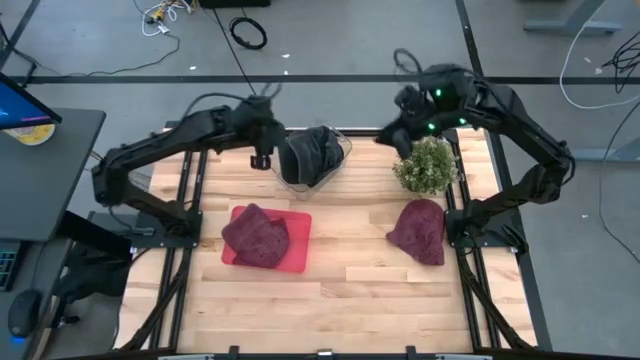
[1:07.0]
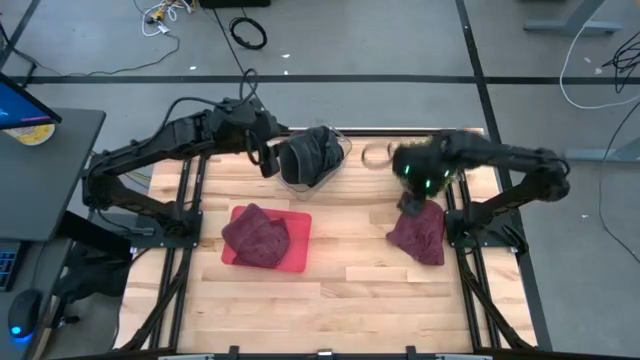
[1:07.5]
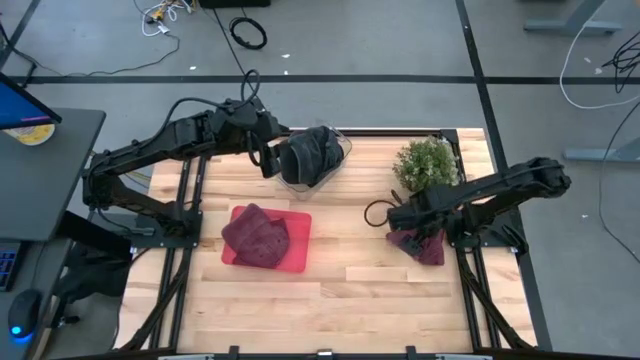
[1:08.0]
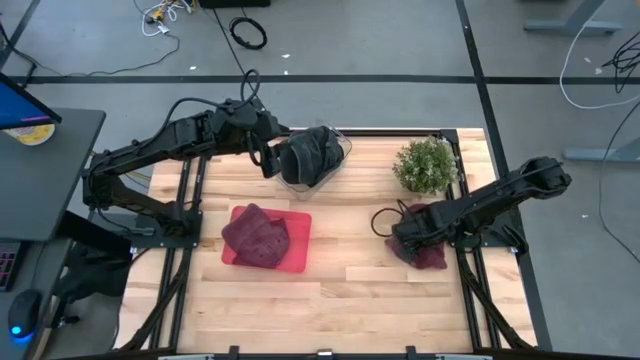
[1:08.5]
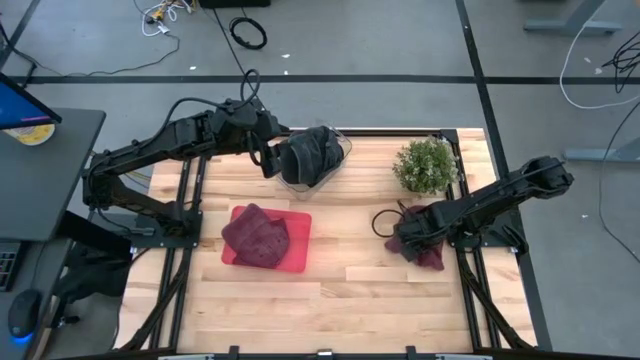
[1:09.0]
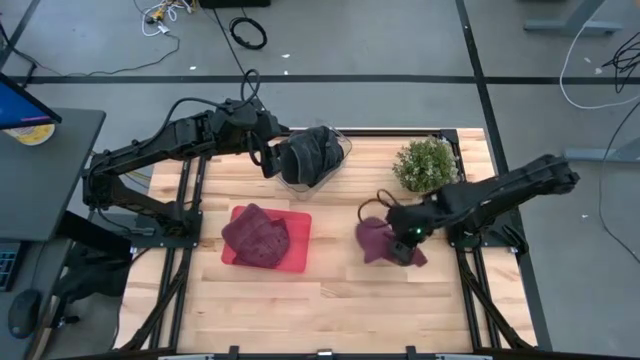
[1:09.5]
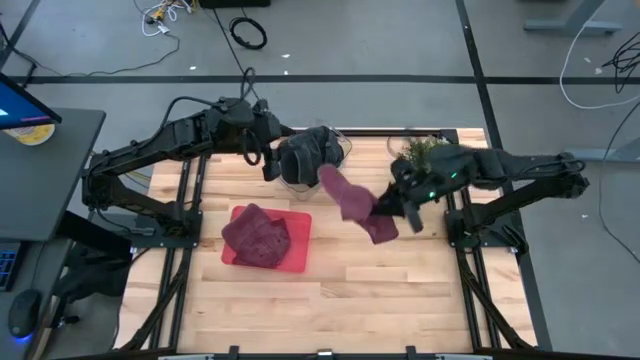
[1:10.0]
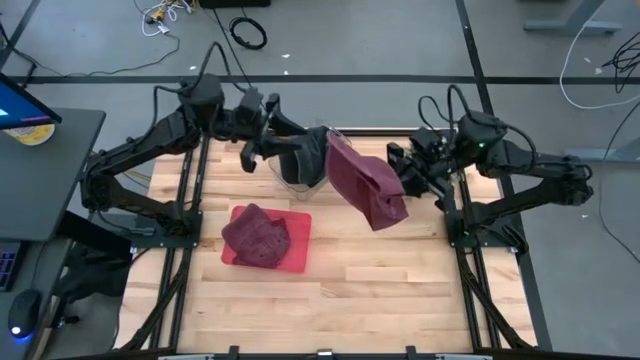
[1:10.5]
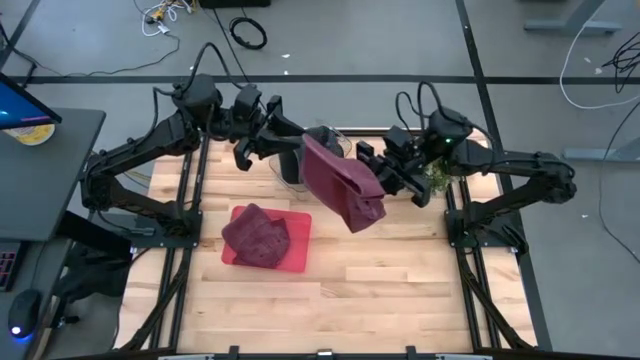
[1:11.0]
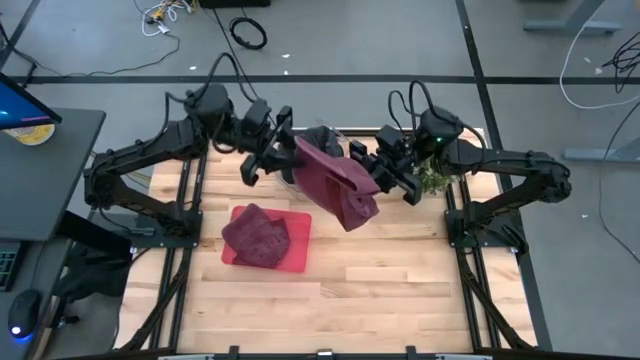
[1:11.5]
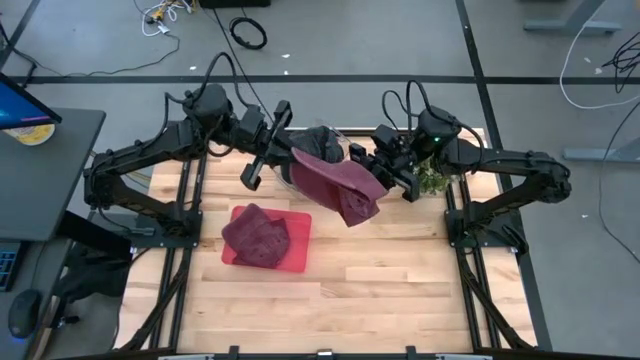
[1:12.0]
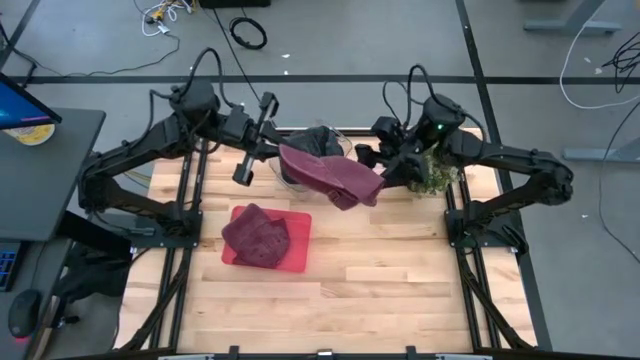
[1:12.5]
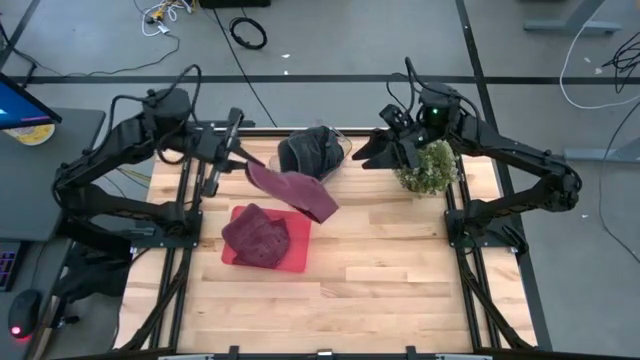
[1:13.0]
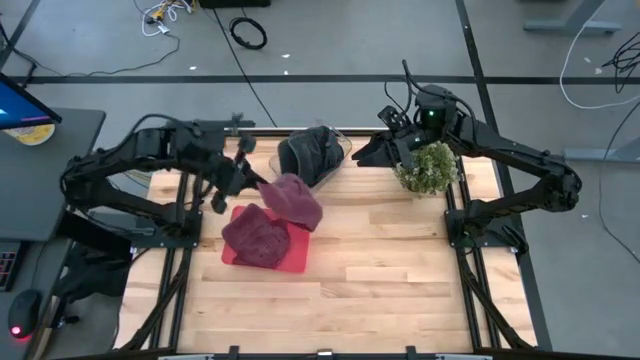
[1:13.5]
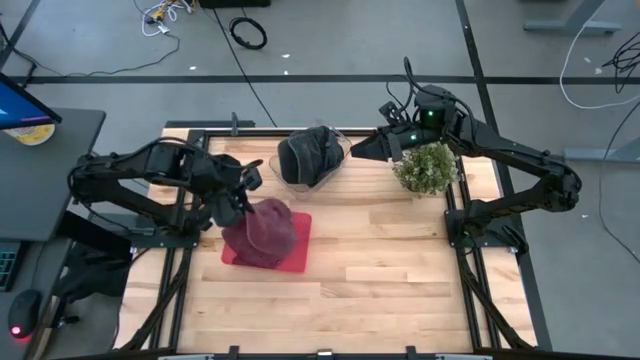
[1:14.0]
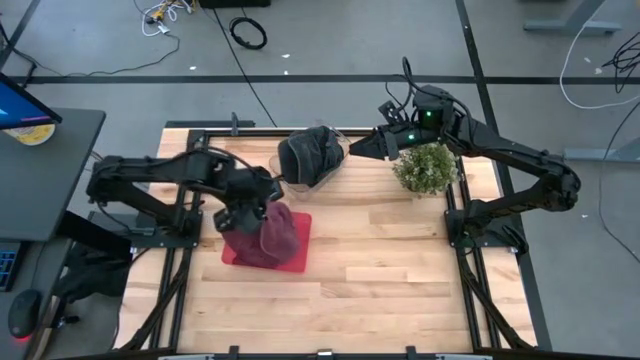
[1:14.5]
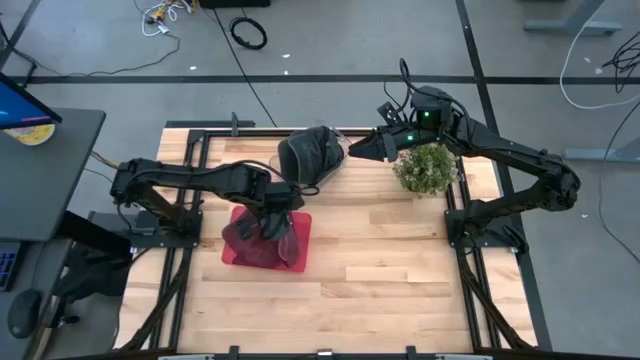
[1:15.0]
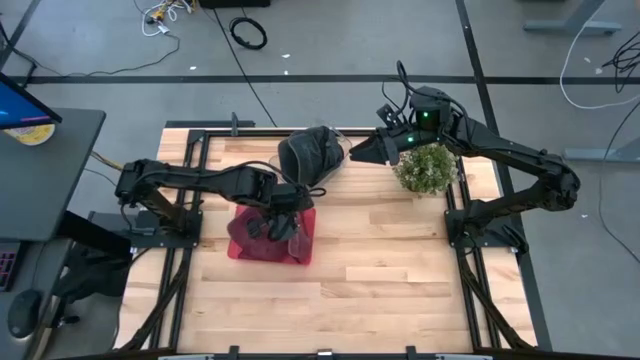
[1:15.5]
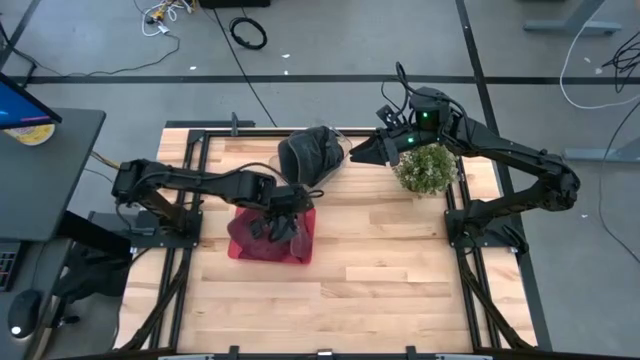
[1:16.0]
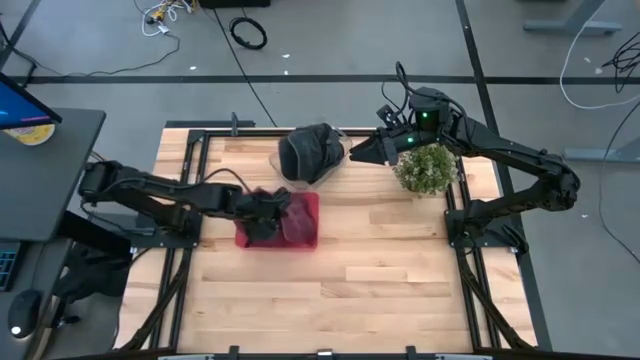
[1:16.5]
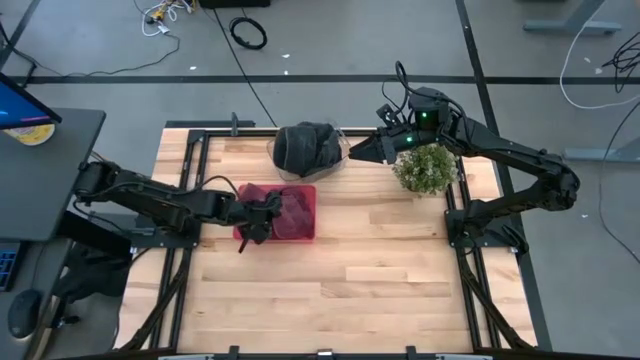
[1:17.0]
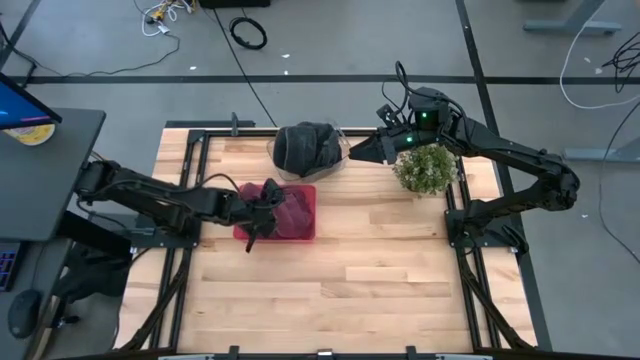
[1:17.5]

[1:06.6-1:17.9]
Task: Pick & Place hat
Put the red cap into the red bin

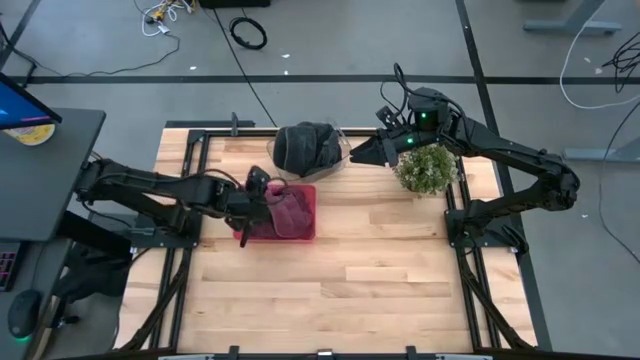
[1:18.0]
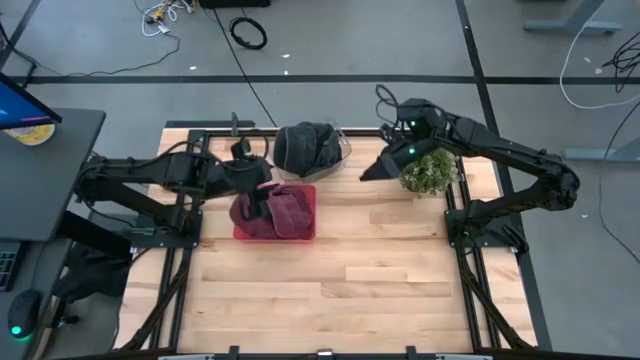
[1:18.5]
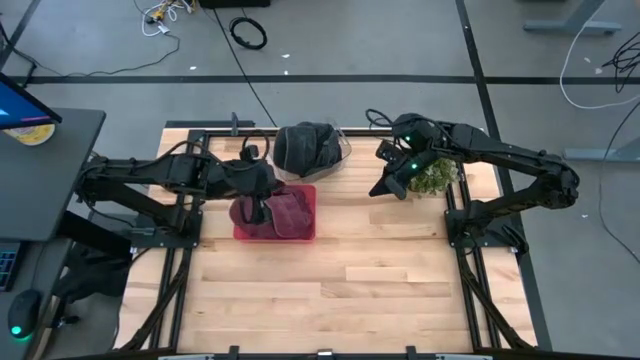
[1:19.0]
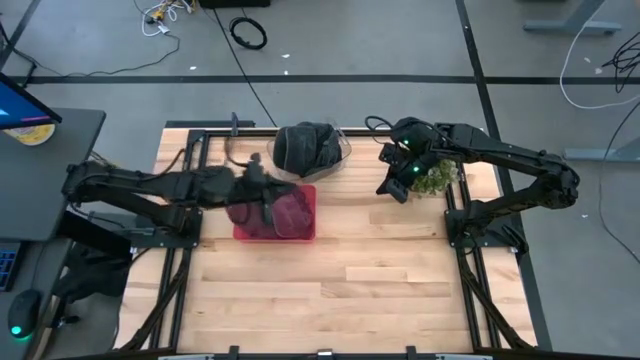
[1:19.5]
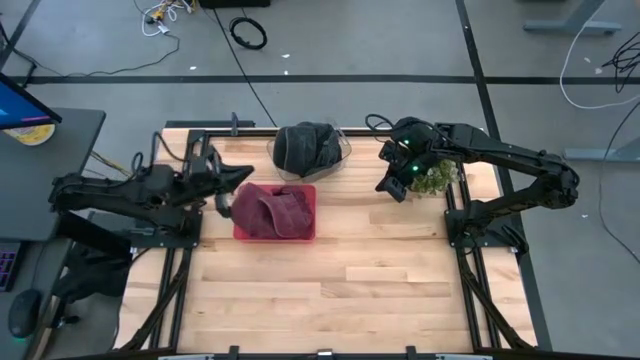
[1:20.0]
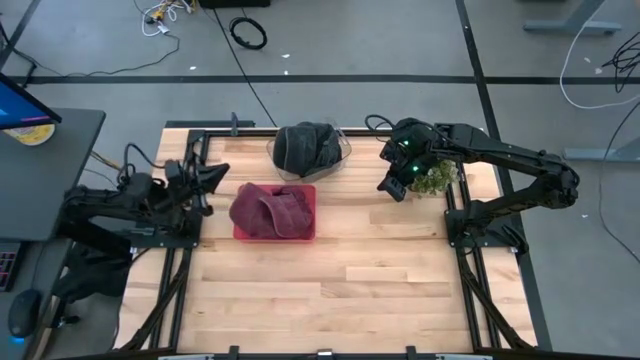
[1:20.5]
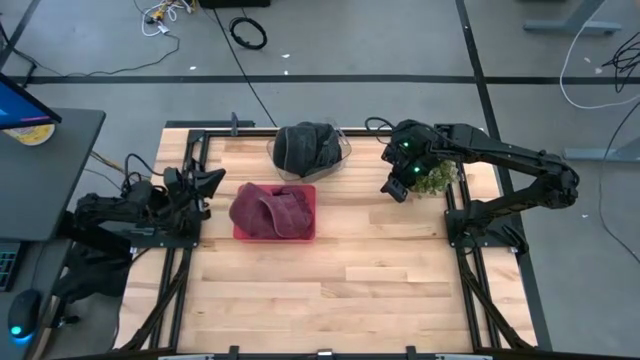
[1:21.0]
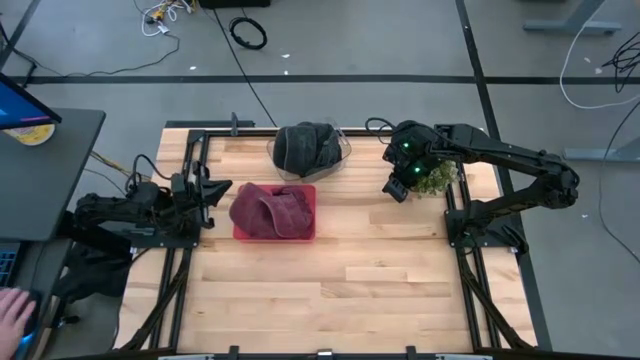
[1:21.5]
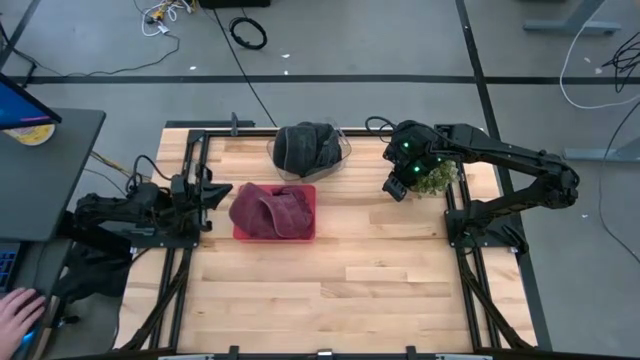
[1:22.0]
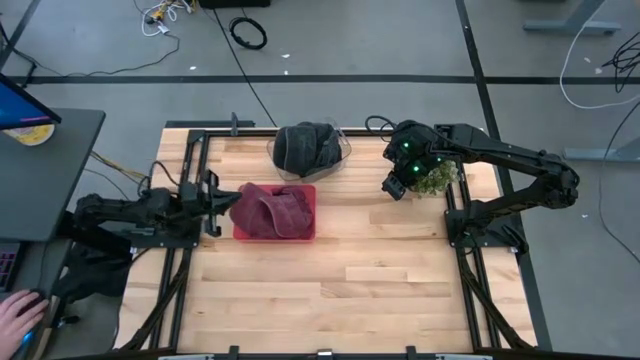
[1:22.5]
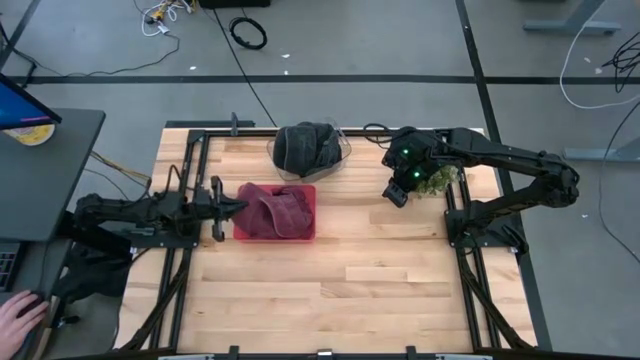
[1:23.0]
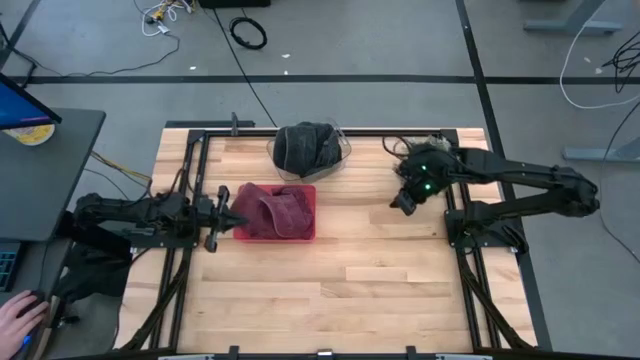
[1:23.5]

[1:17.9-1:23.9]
Return to Home Position

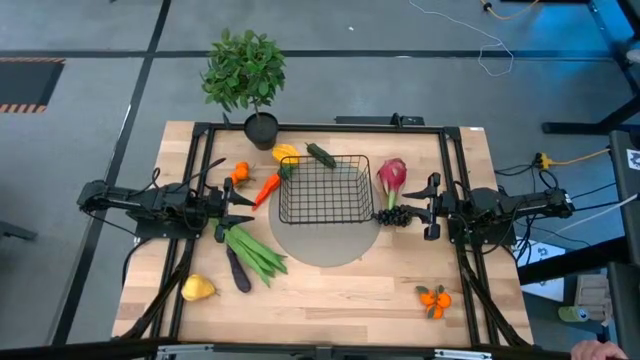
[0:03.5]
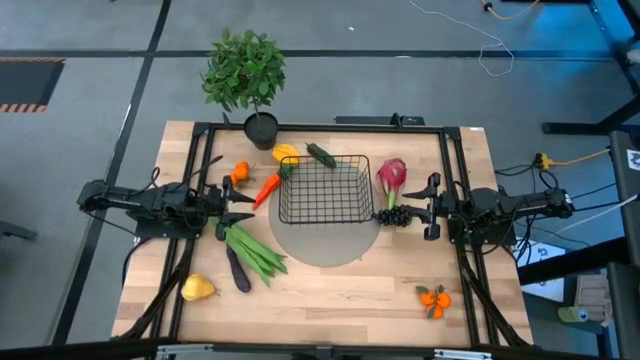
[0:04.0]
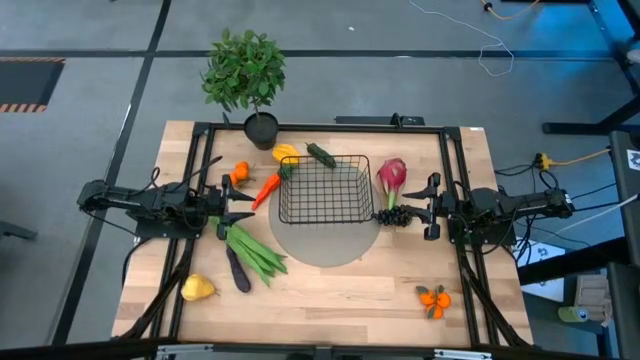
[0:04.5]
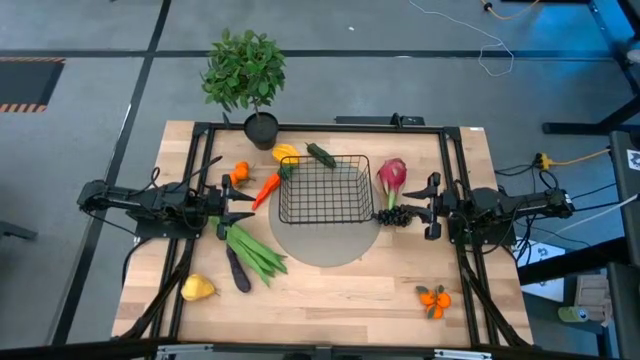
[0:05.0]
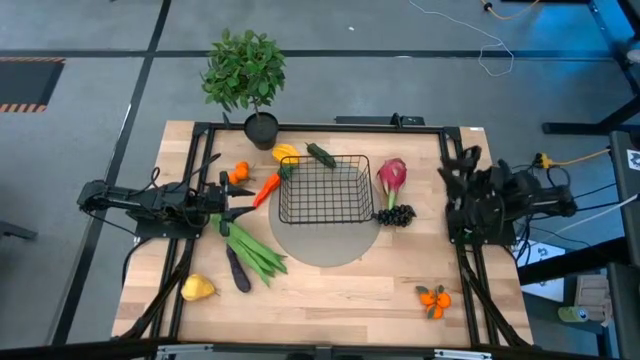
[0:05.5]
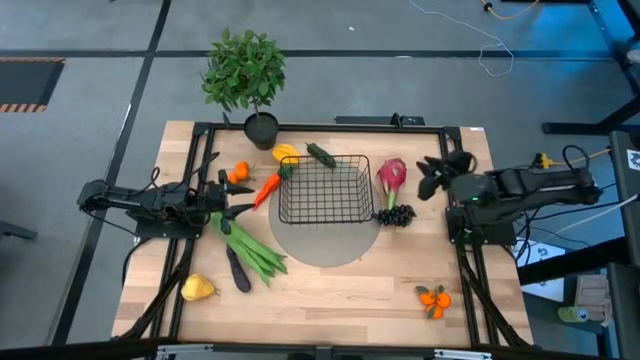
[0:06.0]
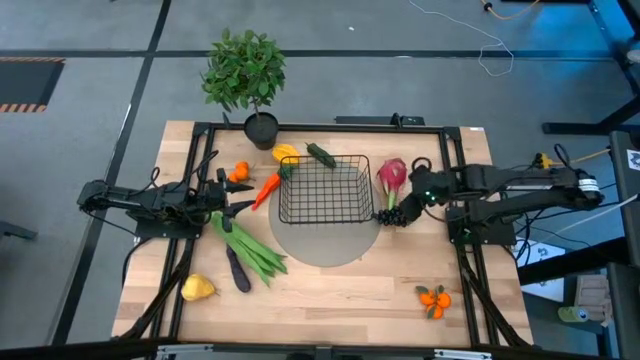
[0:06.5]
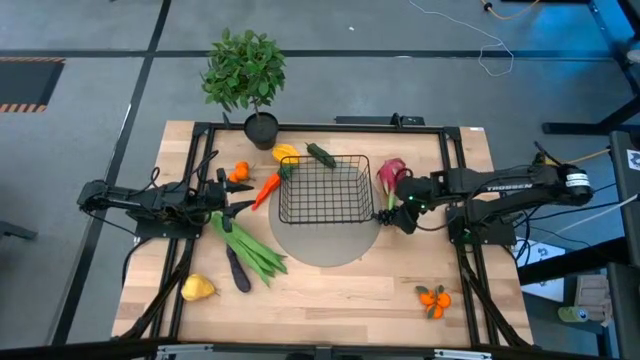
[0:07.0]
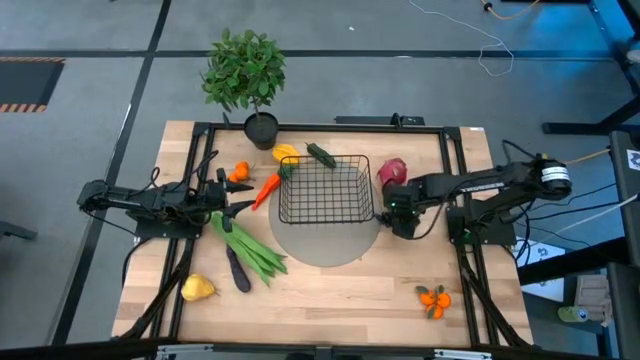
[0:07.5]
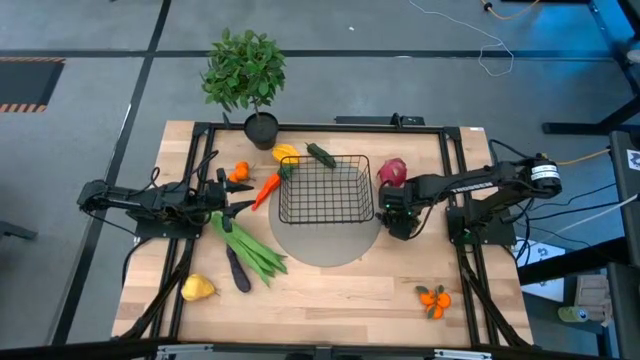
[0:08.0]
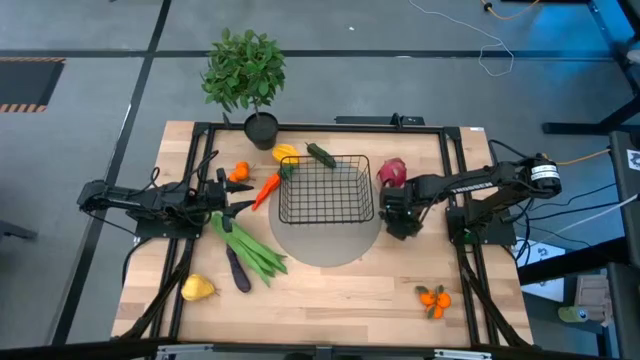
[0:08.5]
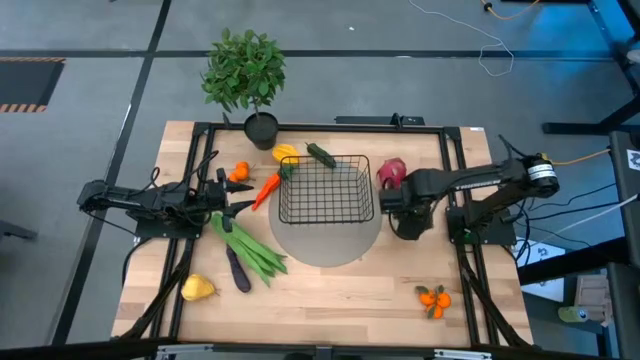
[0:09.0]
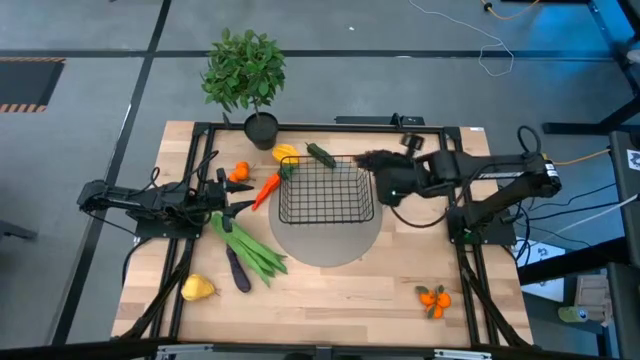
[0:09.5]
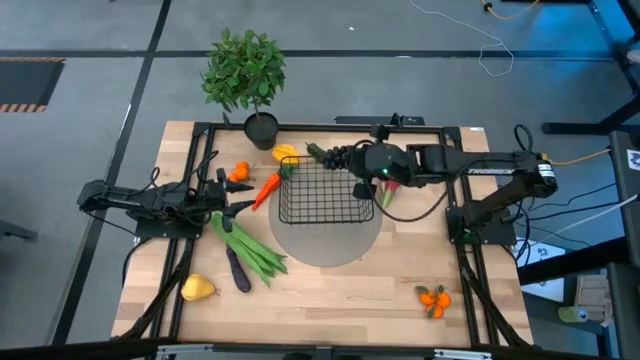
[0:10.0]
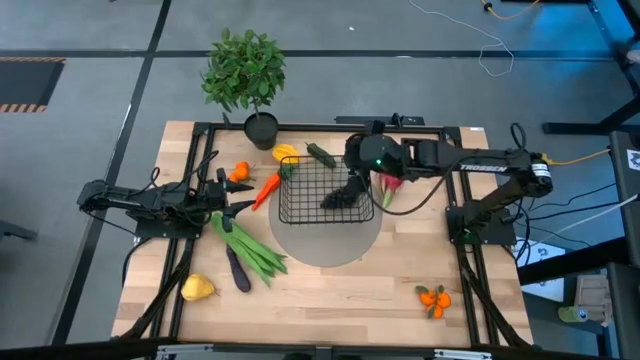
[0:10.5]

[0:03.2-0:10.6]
Task: Build produce basket
Put the grapes into the black wire basket
